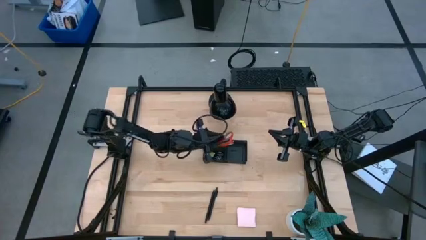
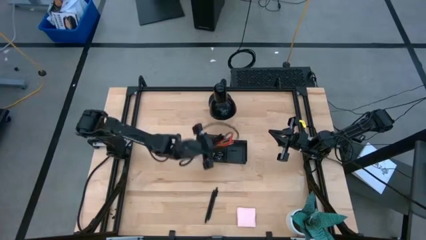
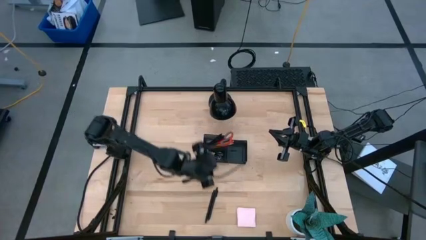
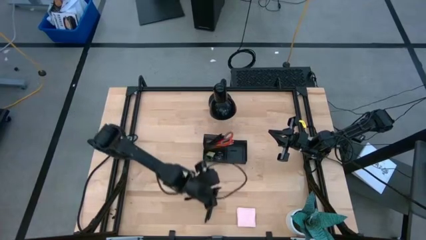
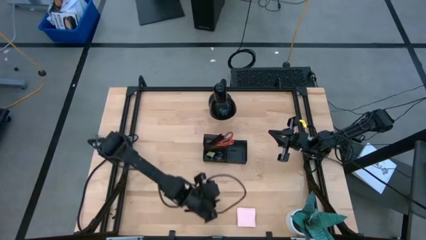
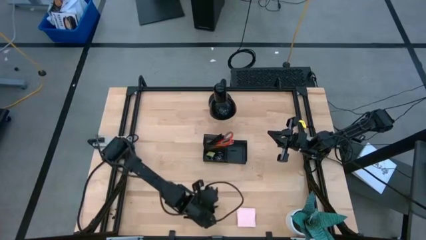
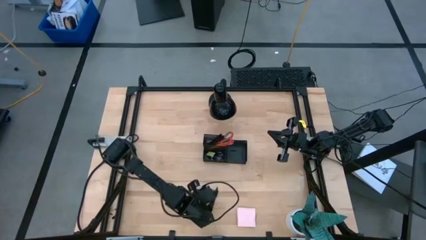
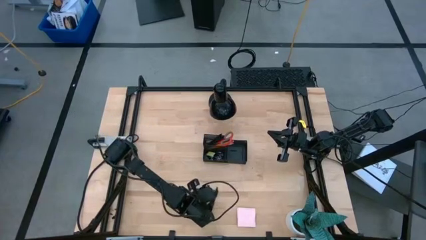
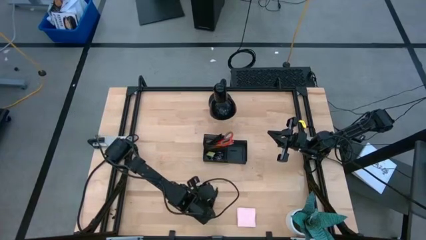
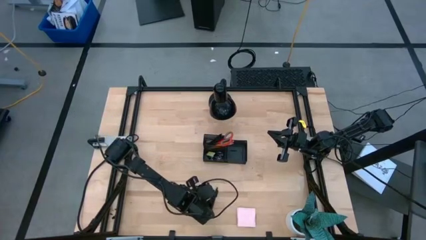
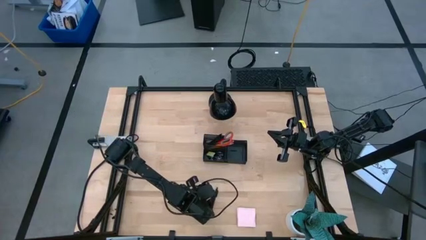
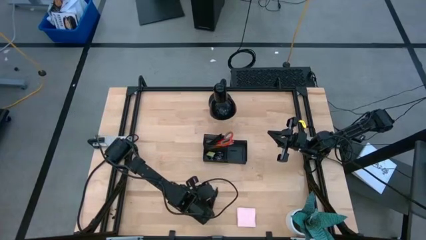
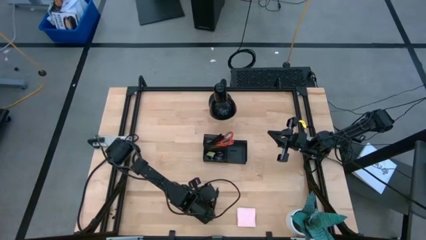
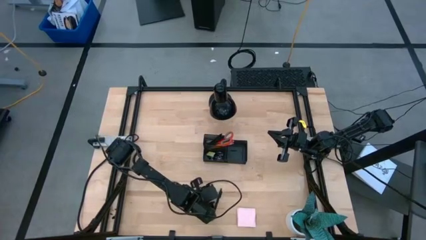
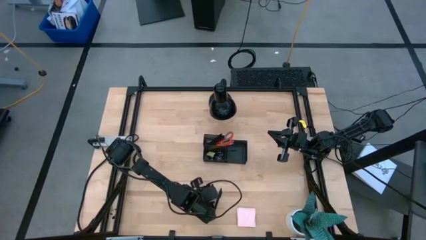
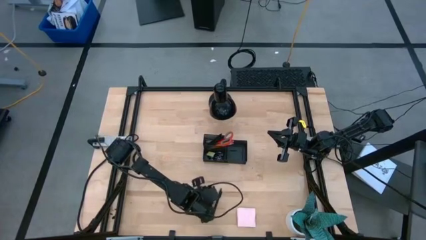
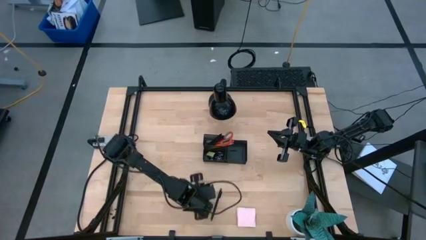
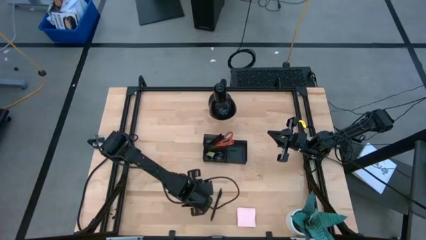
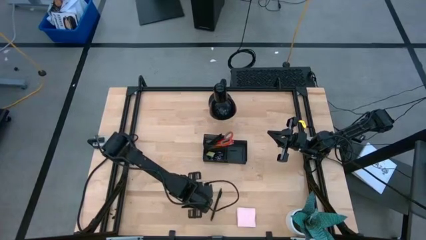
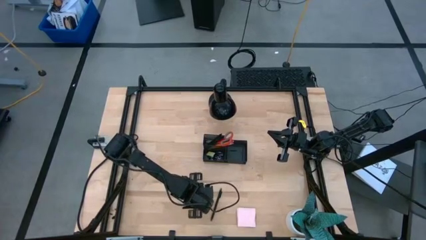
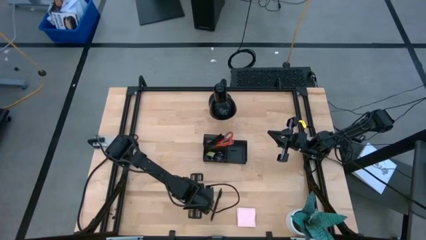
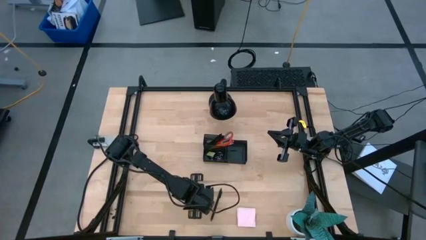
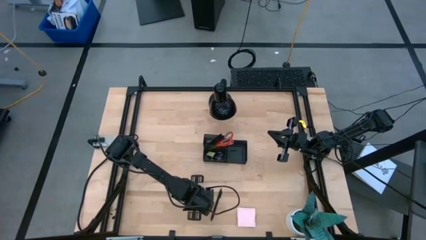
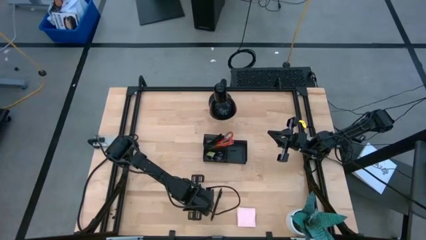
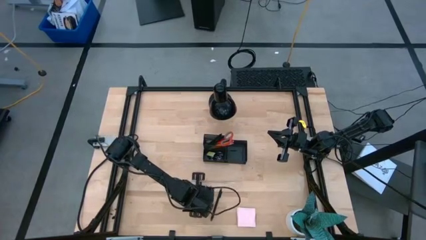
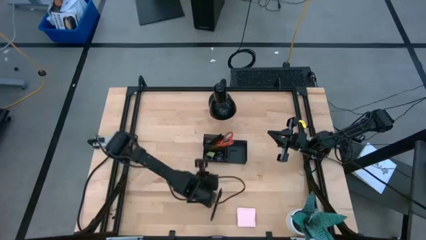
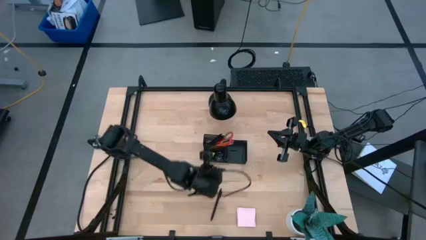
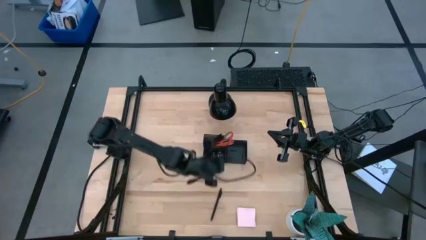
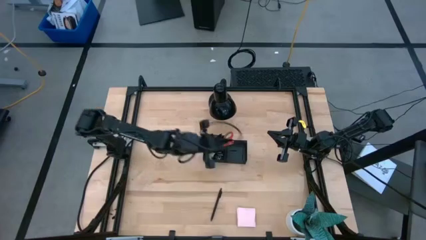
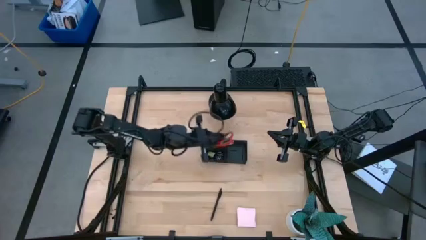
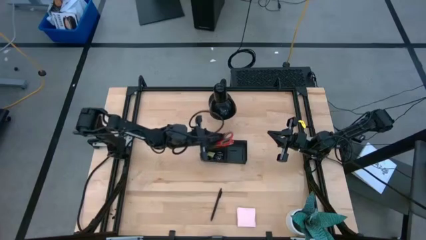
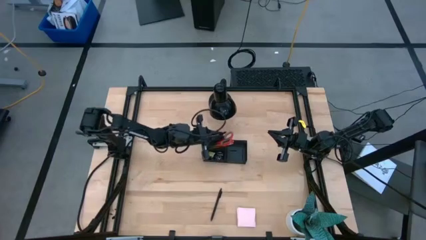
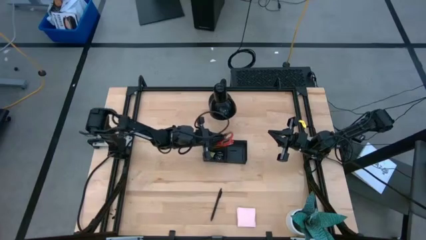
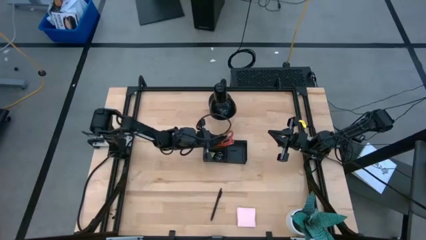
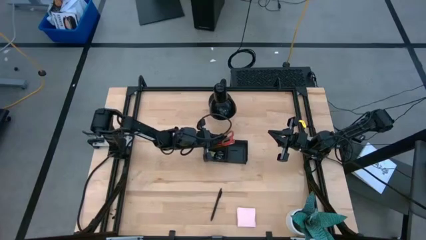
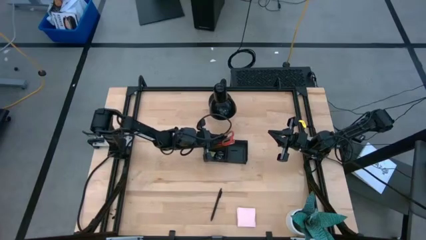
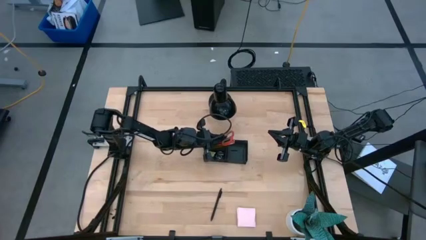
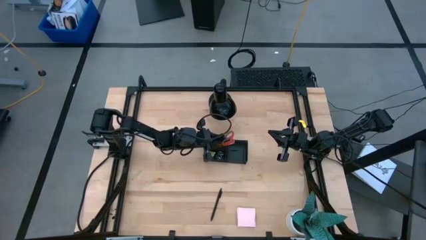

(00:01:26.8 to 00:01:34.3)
Task: Pick and place office supplies into organizer
Put the black pen into the black desk organizer

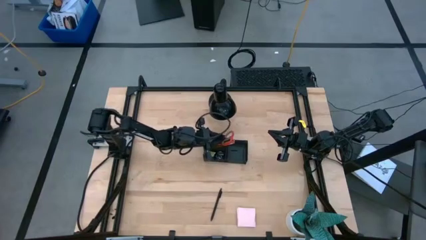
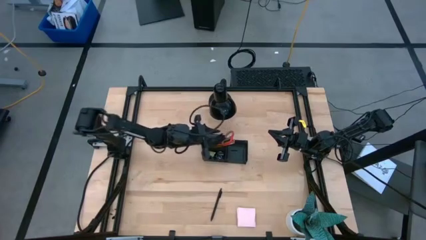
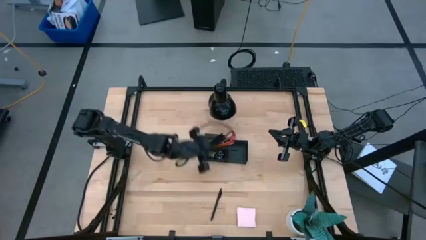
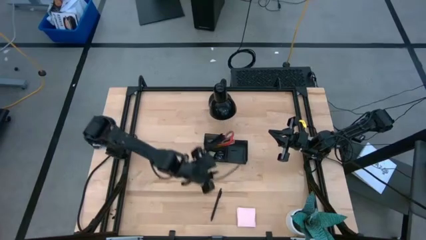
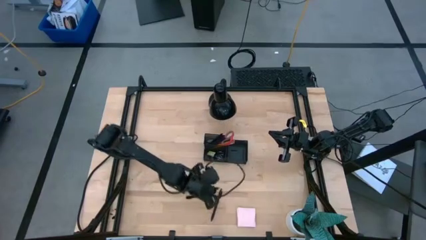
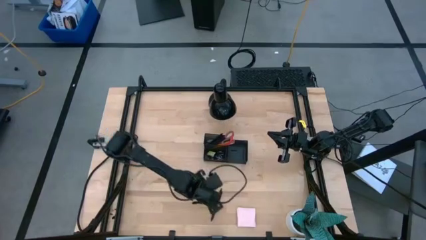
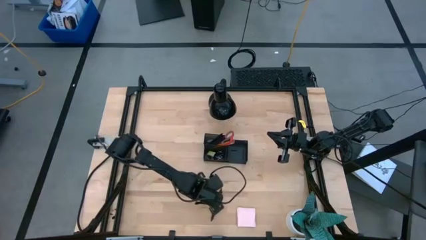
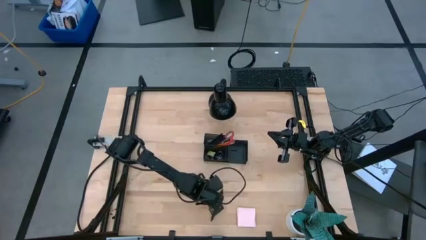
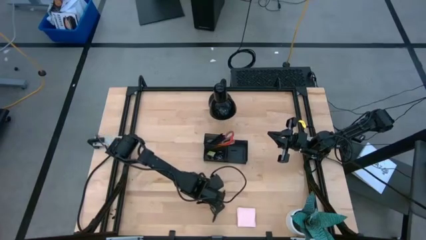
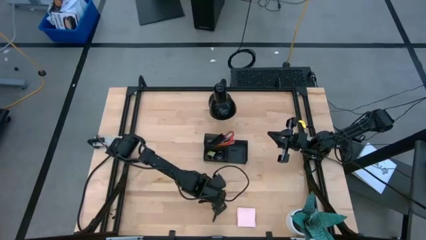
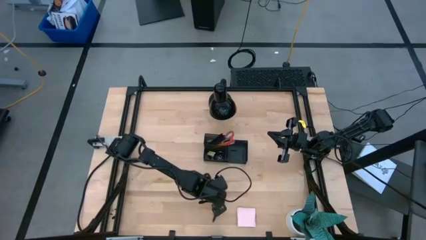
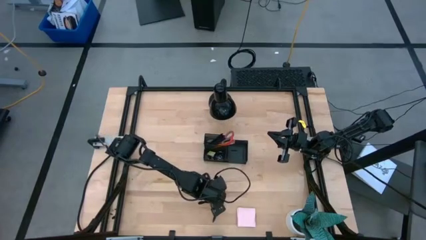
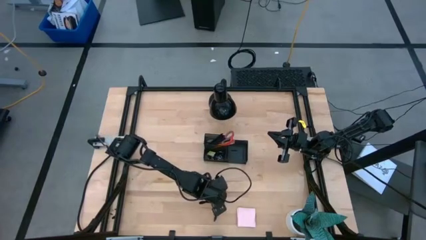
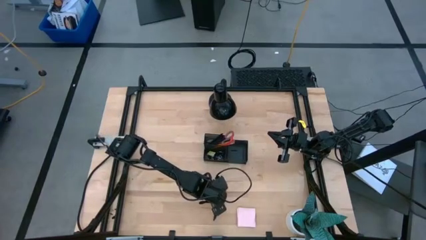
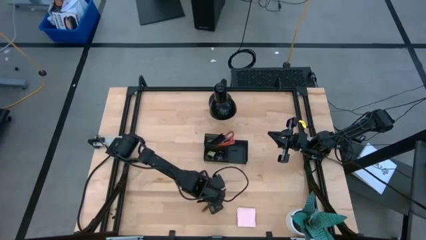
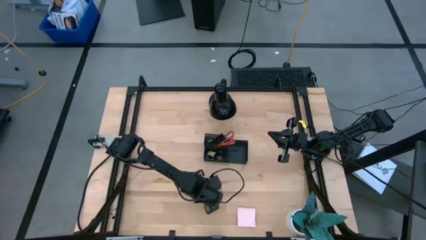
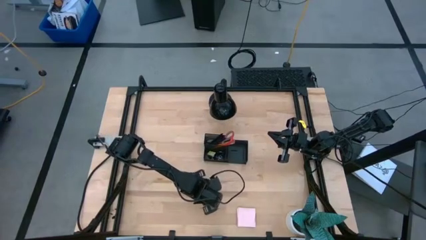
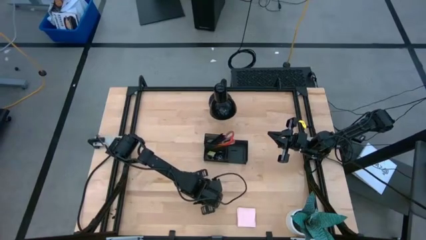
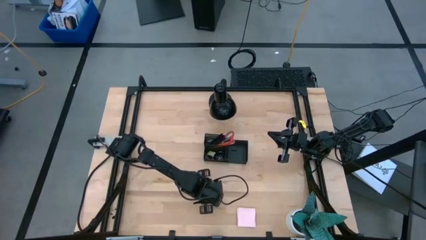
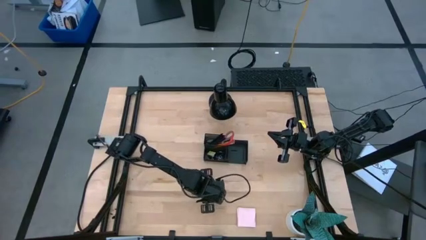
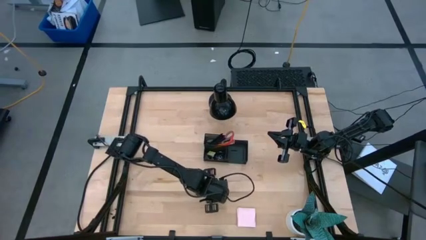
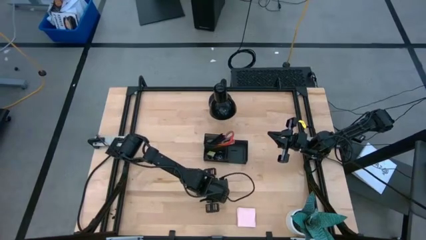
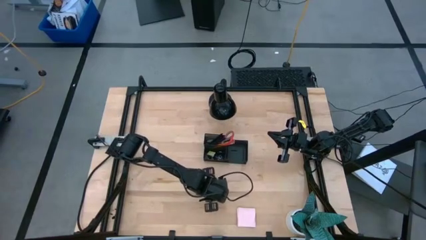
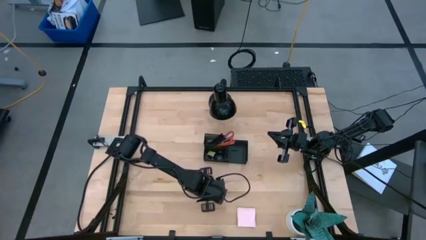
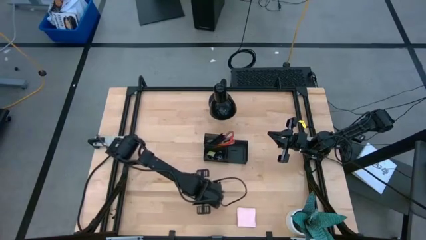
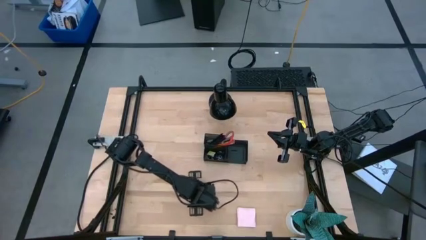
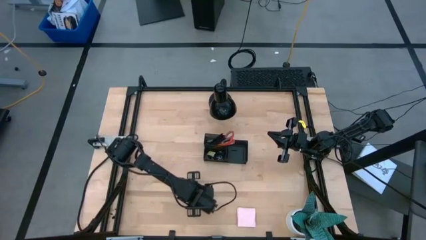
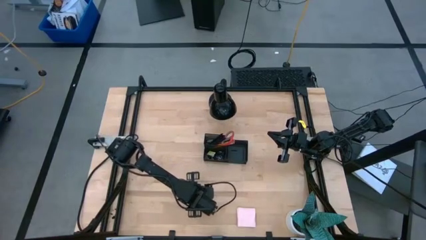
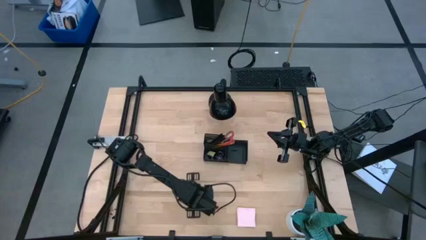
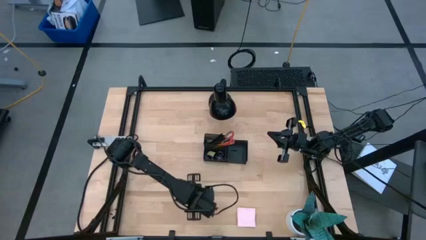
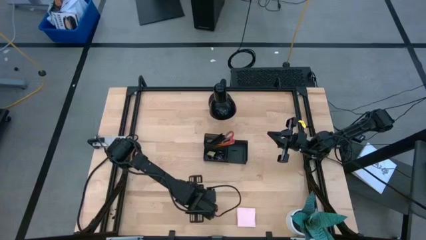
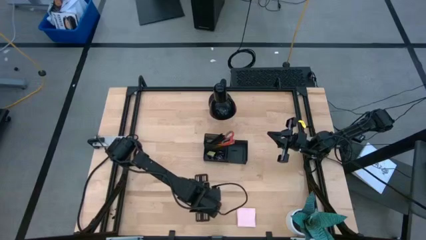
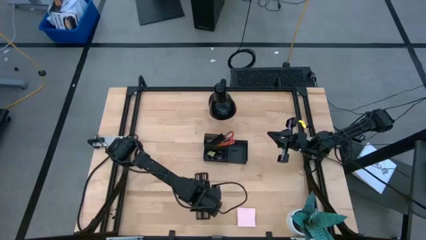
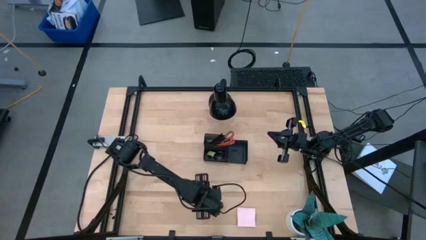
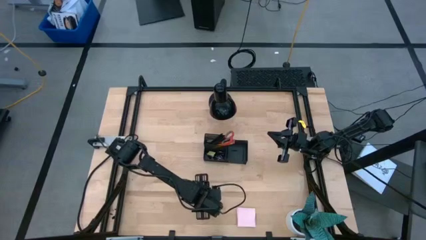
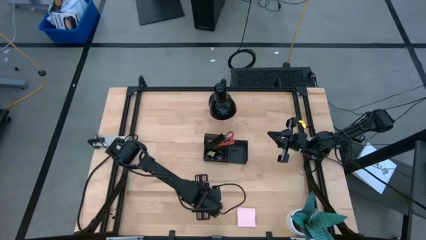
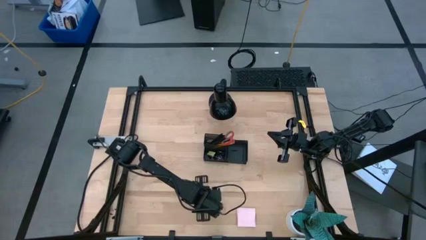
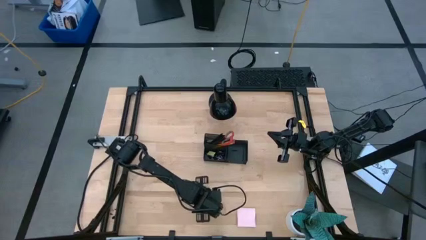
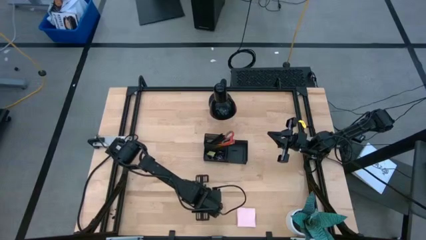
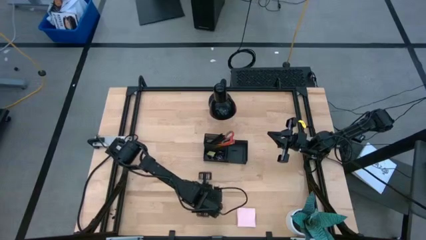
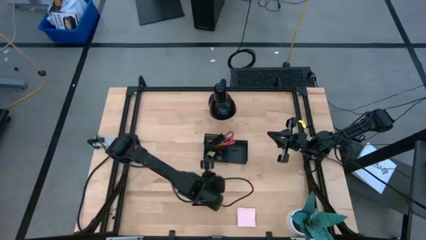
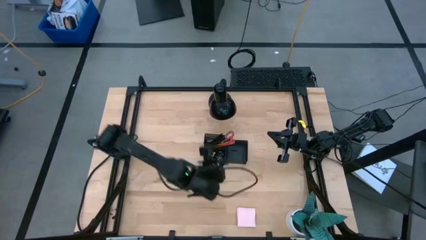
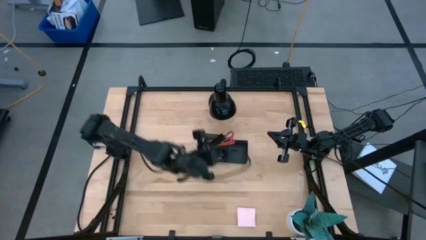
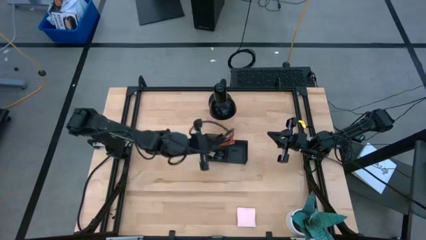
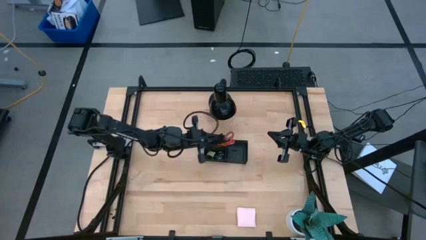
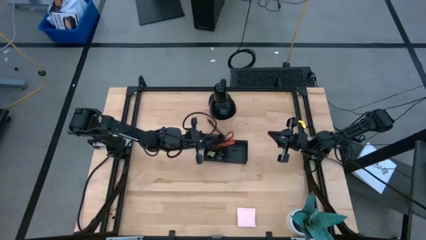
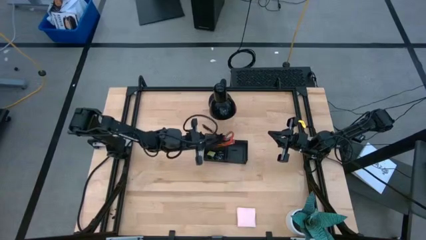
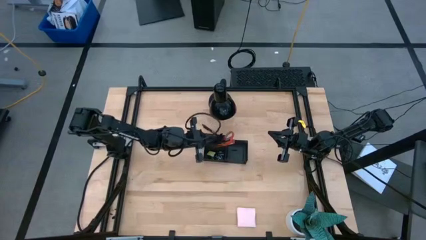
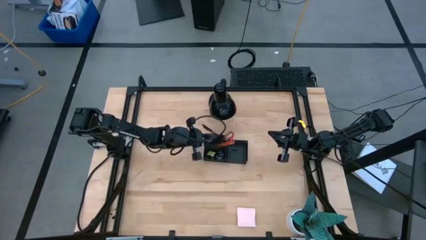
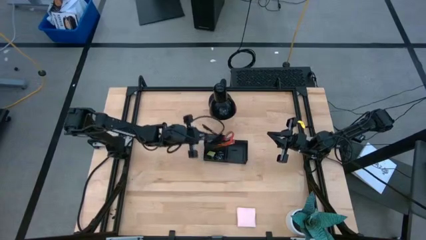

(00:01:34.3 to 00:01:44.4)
Put the black pen into the black desk organizer
